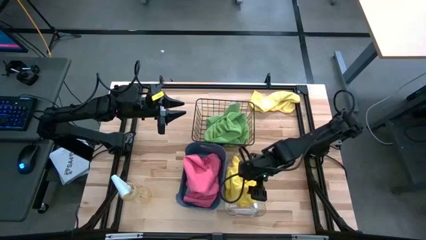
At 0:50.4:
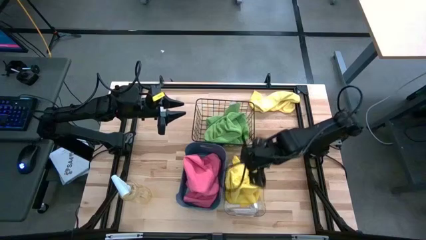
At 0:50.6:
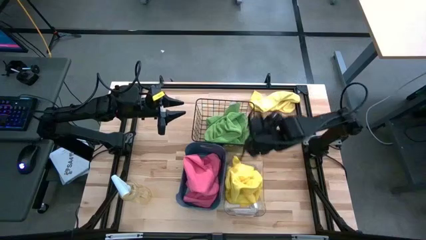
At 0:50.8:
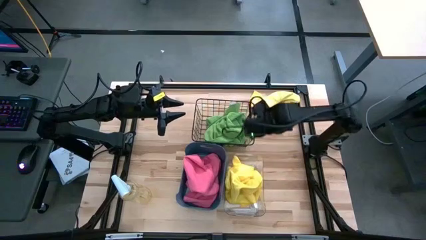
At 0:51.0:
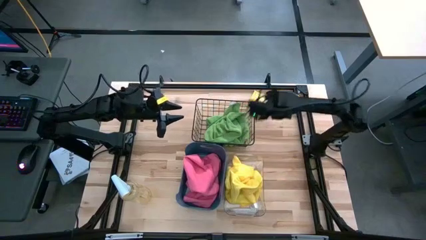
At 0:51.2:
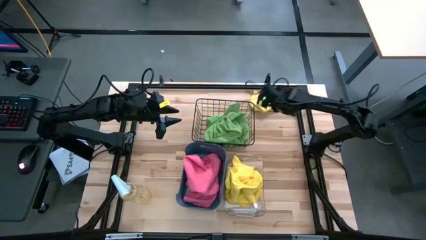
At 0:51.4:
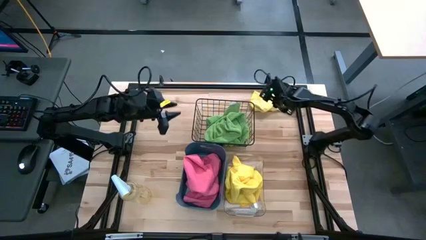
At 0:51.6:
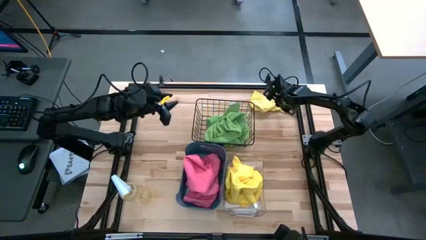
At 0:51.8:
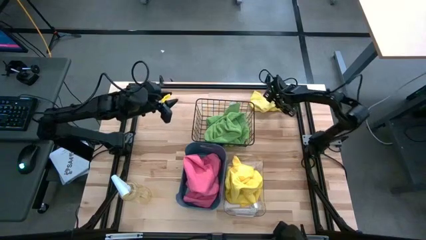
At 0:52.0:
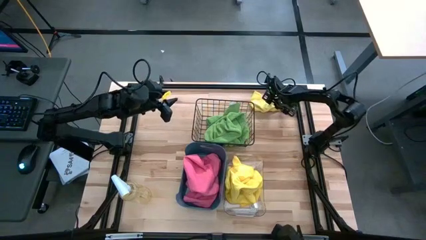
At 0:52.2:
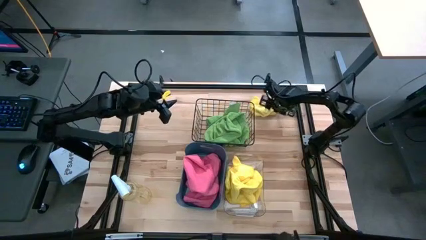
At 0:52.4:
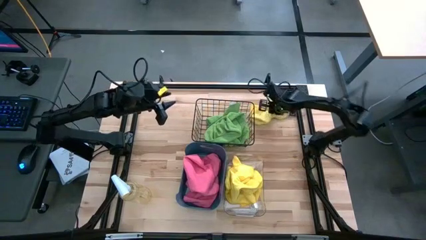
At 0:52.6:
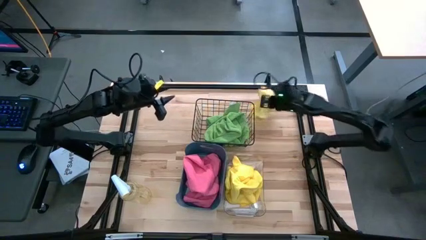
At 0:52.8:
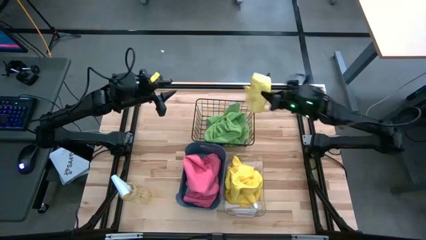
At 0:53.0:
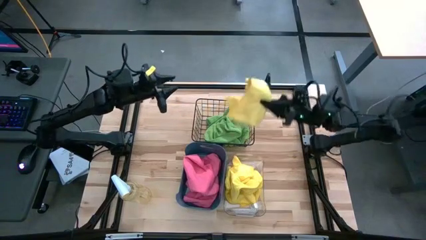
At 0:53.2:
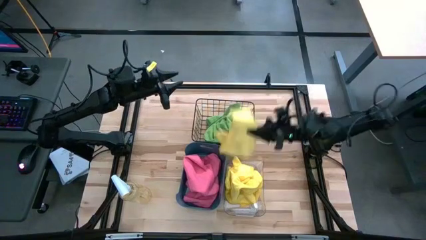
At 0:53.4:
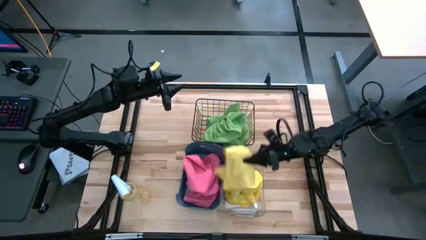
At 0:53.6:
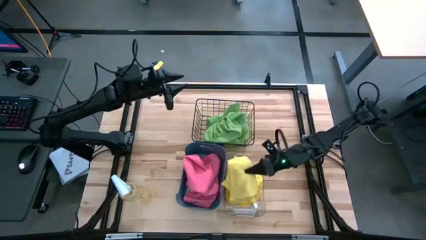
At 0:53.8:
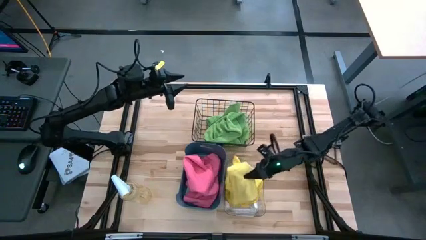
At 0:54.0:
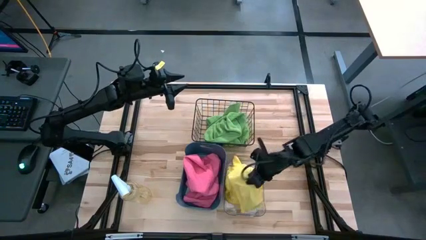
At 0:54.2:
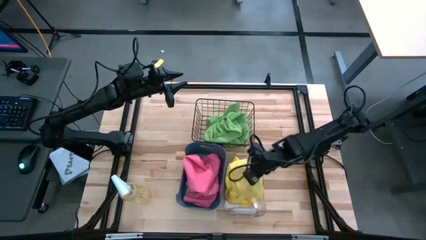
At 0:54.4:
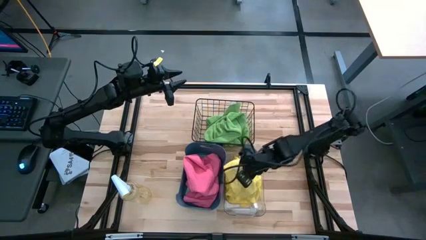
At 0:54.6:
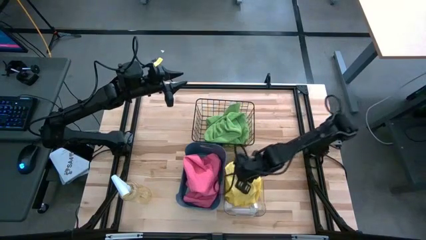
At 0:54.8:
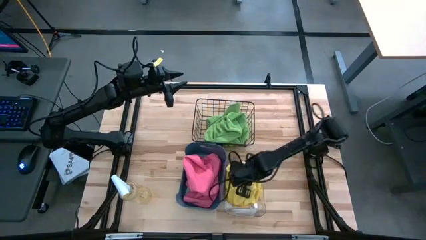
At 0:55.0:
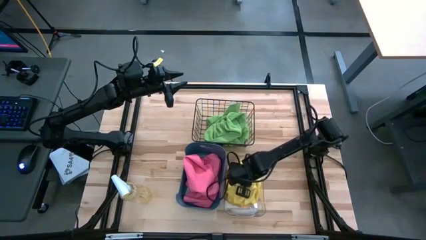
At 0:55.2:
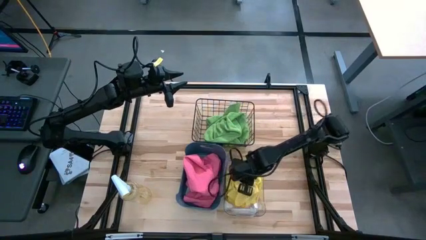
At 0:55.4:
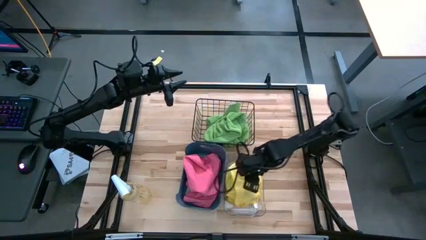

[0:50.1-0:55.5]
Task: Sort microfiber towel by color & place in baskets
Put the yellow microfiber cloth into the transparent bin

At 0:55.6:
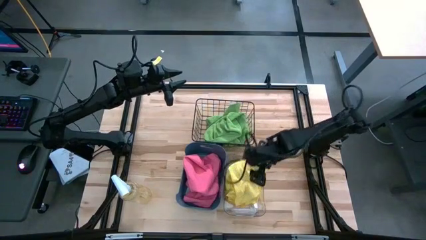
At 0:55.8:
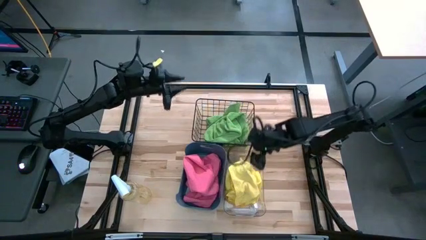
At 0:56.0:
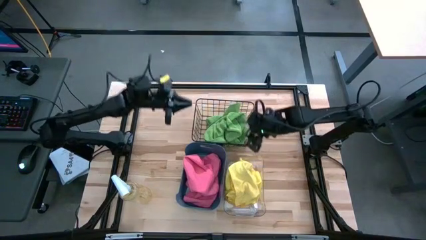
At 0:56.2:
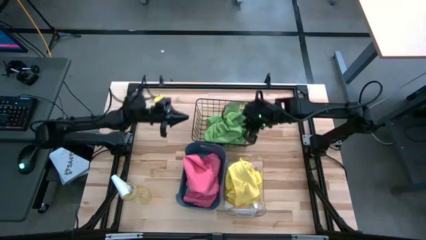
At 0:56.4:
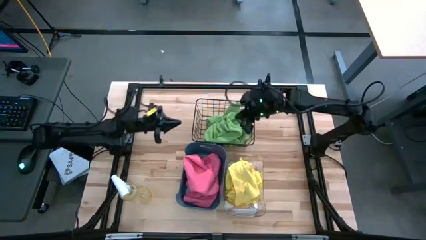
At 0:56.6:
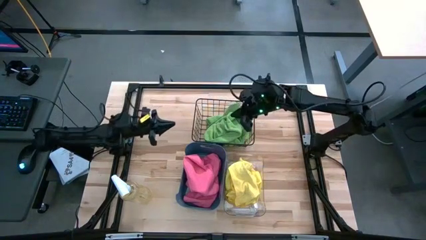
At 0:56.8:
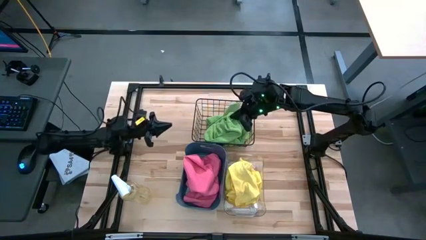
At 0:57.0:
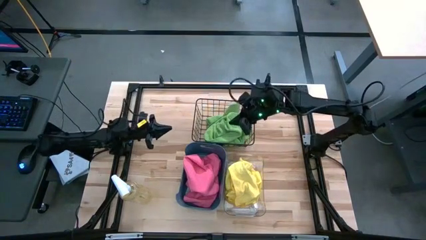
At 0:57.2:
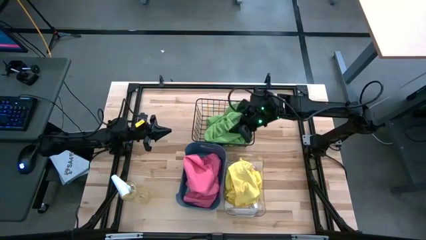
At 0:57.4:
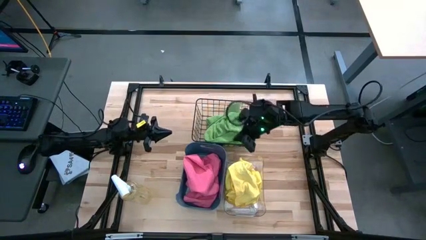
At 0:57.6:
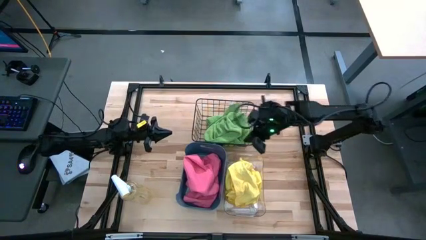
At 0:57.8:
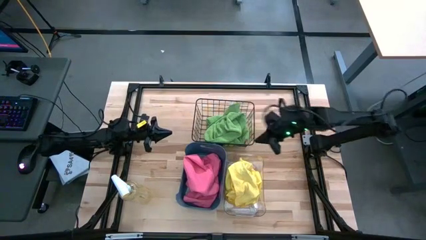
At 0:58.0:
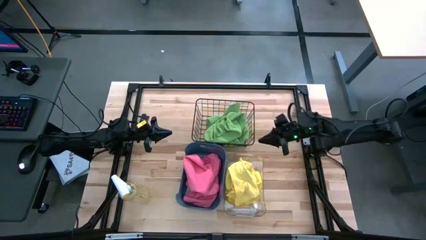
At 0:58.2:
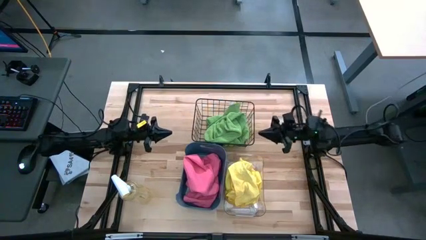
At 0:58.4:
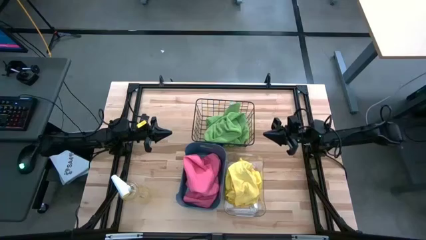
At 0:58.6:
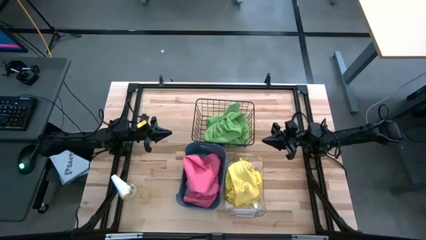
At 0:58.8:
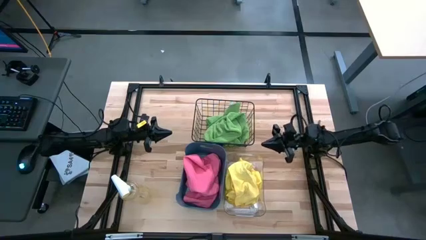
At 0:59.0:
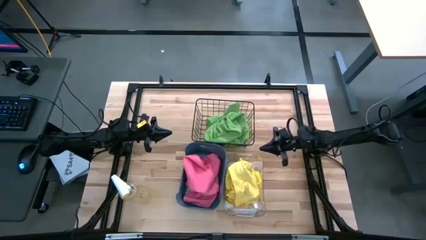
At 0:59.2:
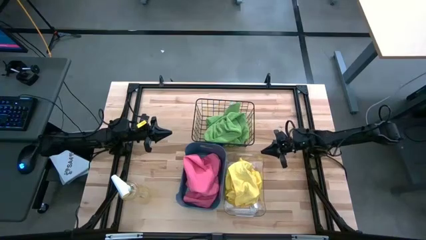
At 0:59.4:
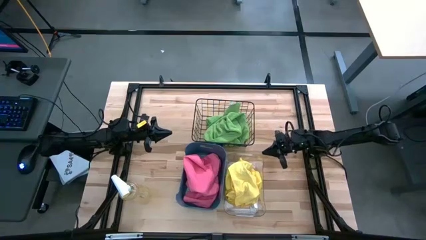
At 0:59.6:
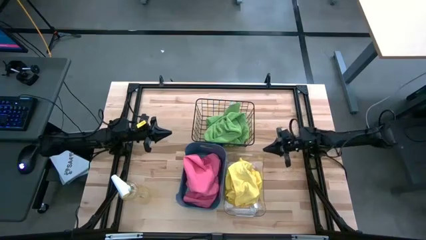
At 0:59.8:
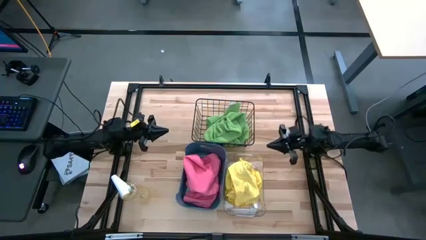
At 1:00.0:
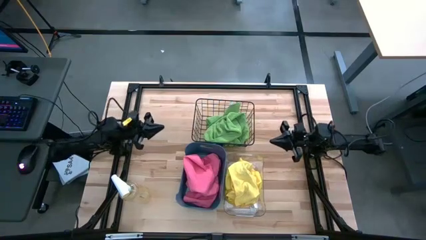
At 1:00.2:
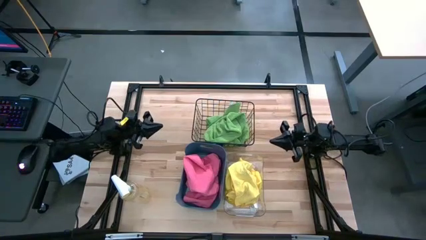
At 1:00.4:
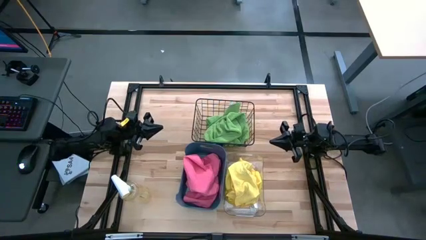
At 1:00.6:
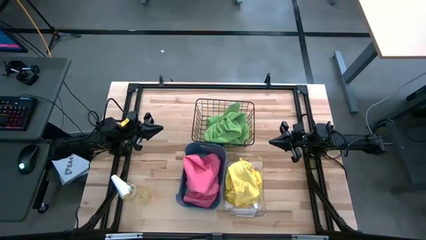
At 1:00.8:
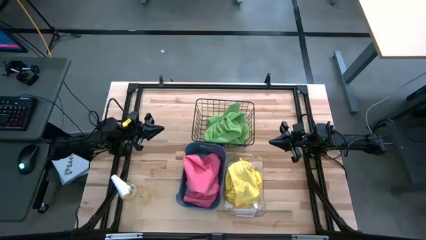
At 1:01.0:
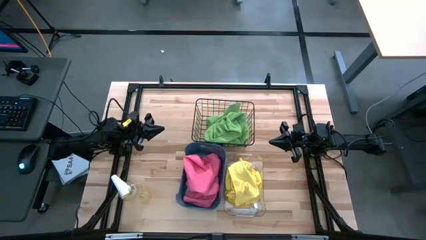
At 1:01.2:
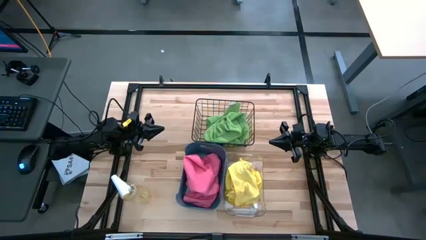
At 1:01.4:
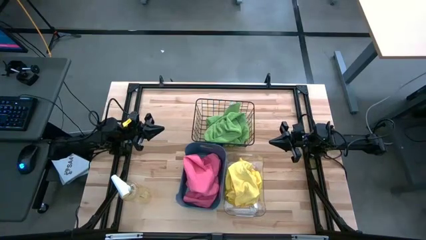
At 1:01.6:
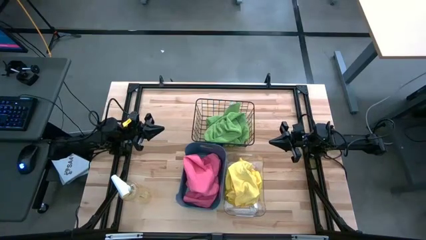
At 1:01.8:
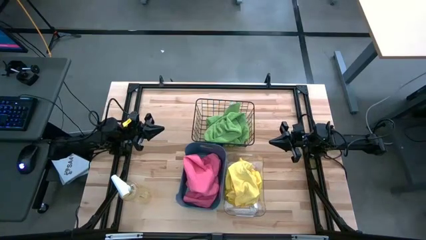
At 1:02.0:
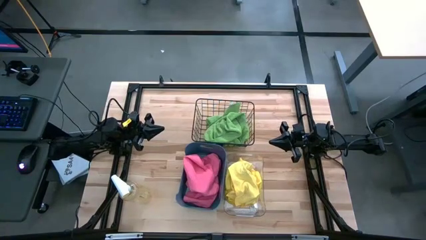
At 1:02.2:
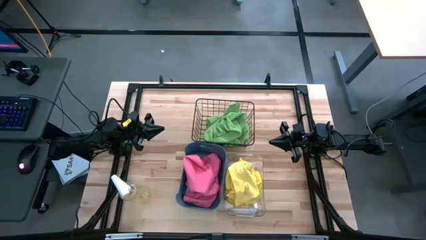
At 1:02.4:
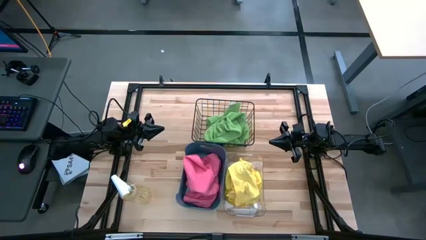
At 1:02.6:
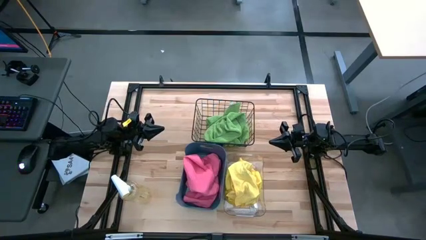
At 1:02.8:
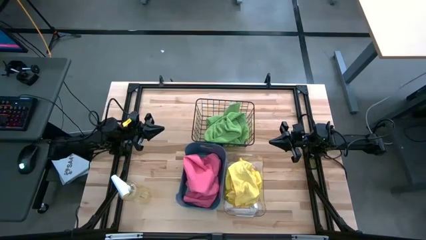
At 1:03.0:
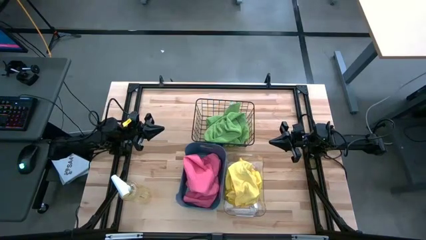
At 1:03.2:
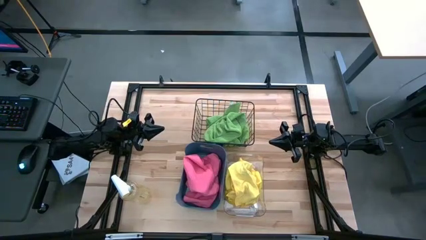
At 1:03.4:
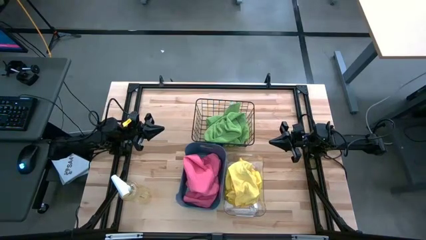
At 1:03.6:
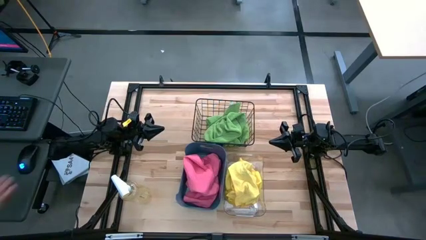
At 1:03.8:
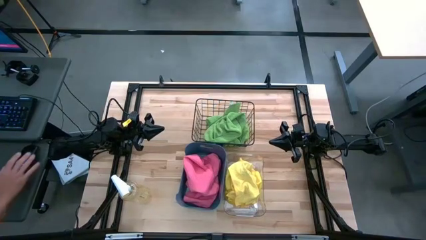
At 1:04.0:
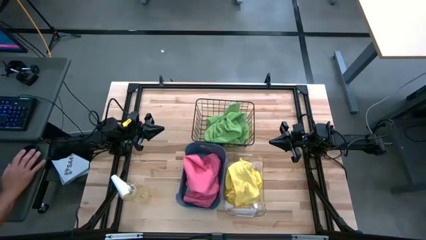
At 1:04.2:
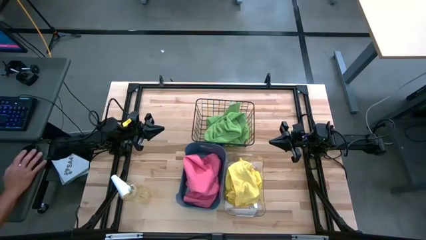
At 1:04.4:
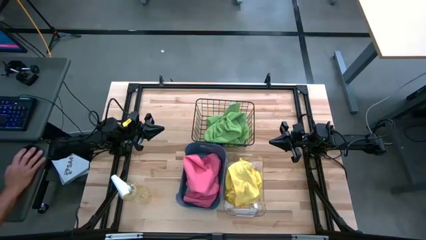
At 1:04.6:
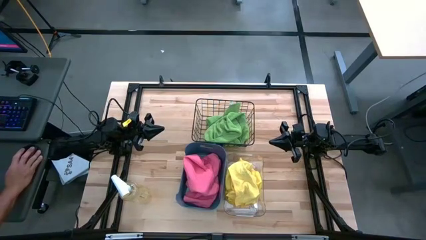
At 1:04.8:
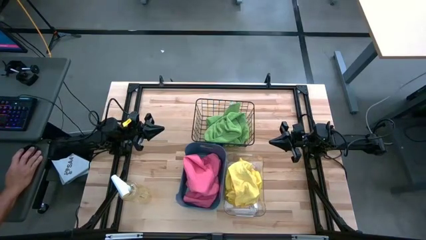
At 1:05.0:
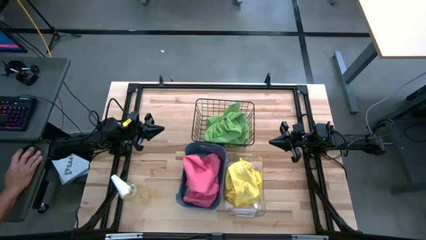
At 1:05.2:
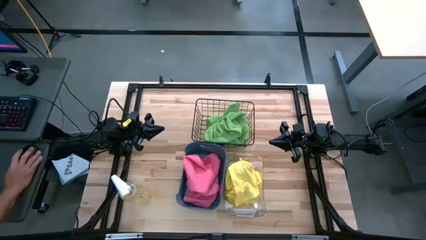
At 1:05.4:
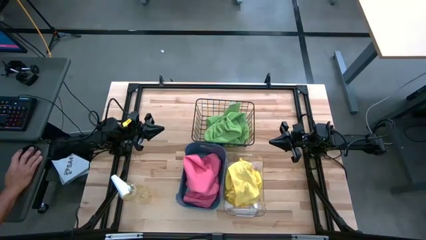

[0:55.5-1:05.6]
Return to Home Position
